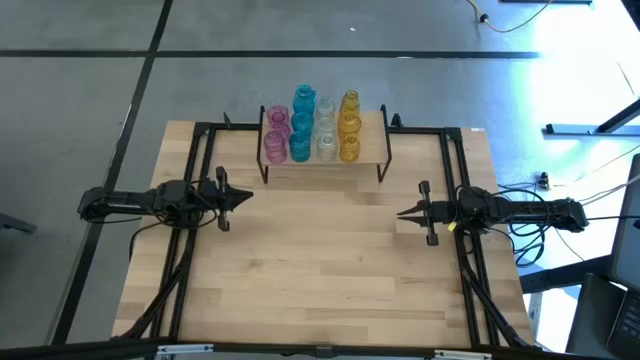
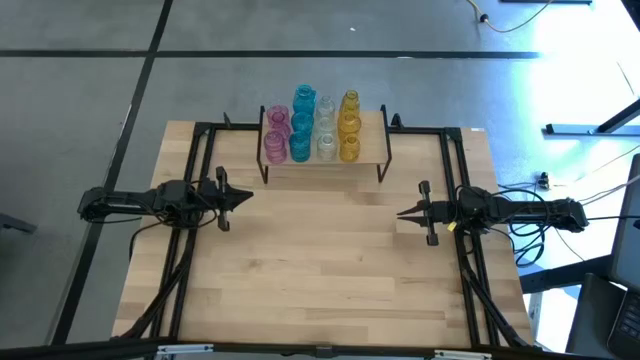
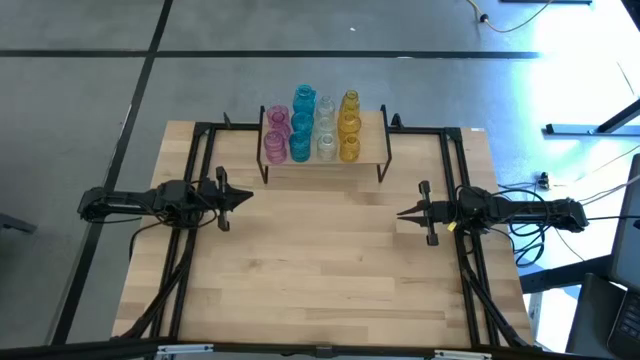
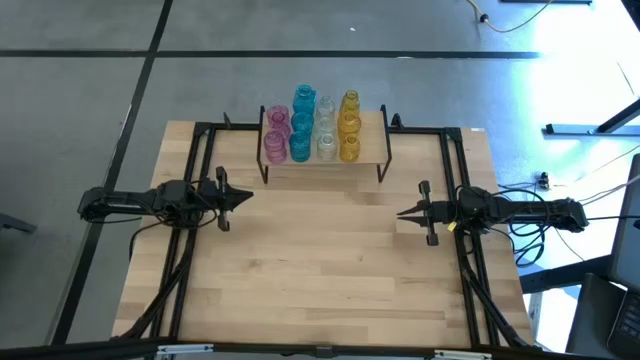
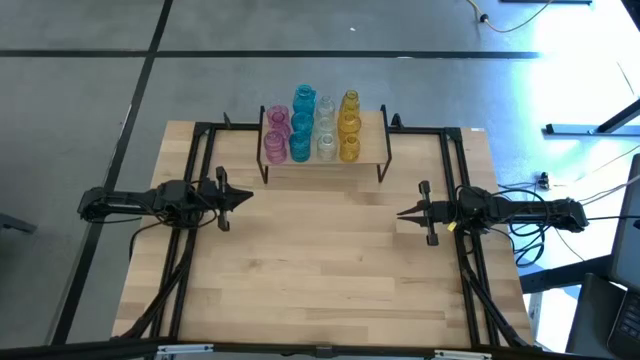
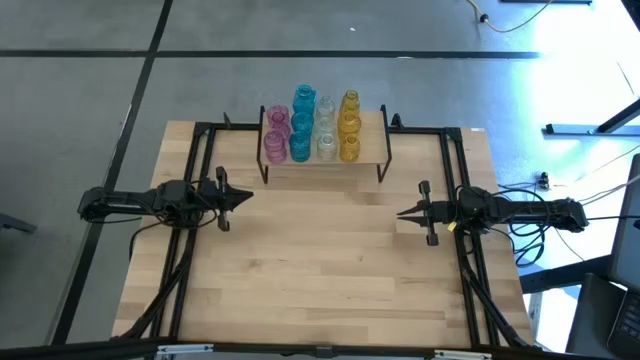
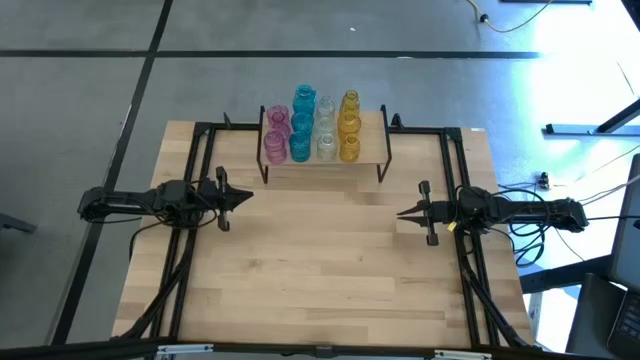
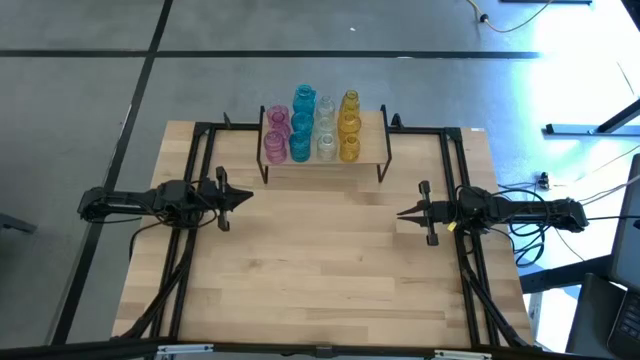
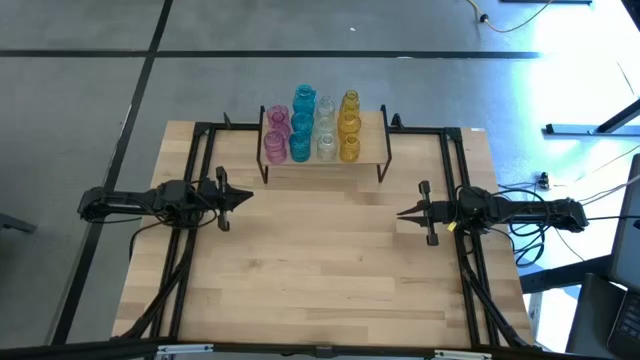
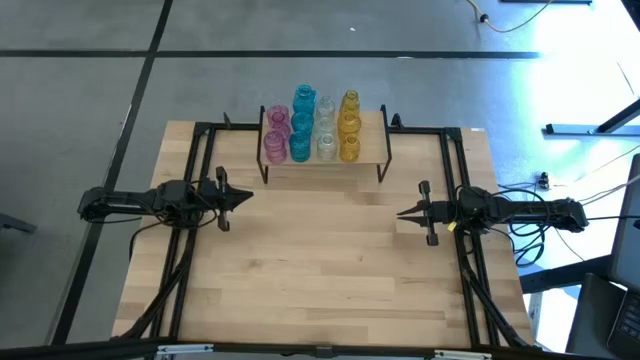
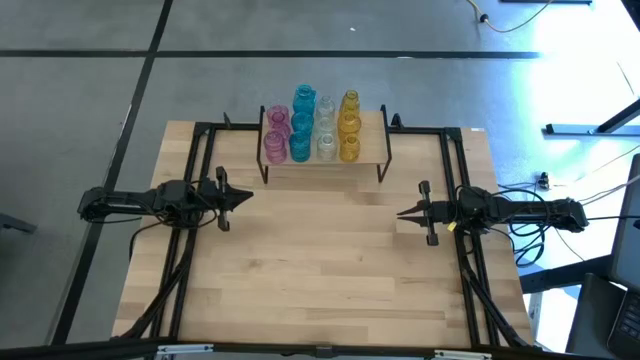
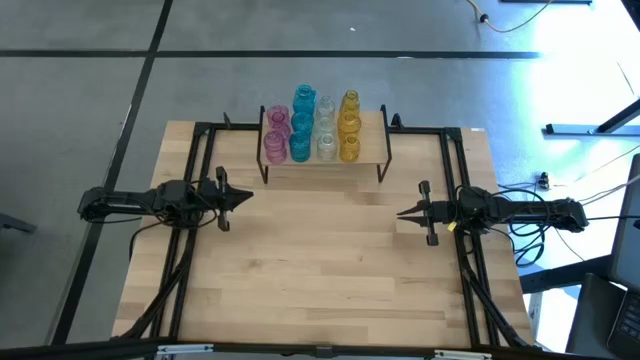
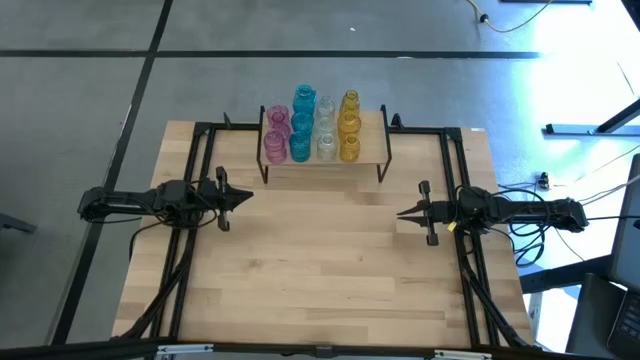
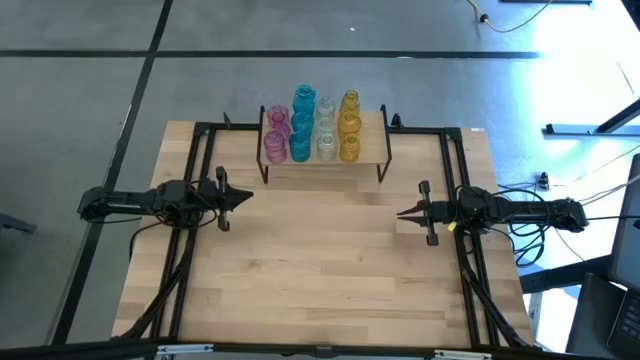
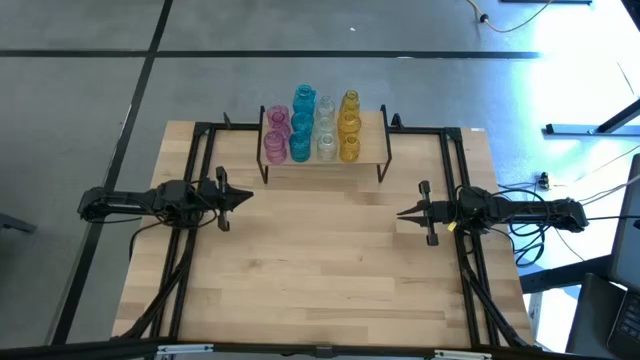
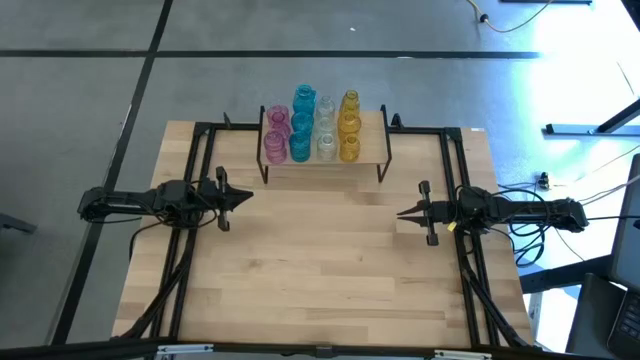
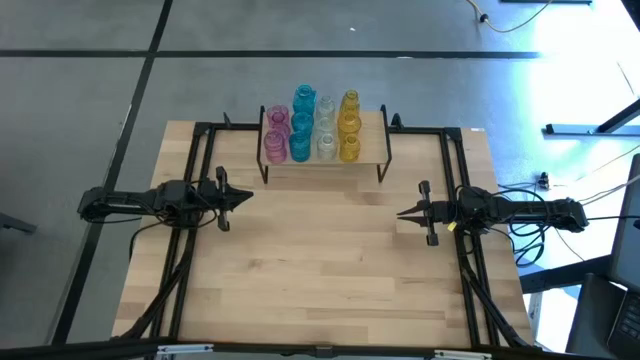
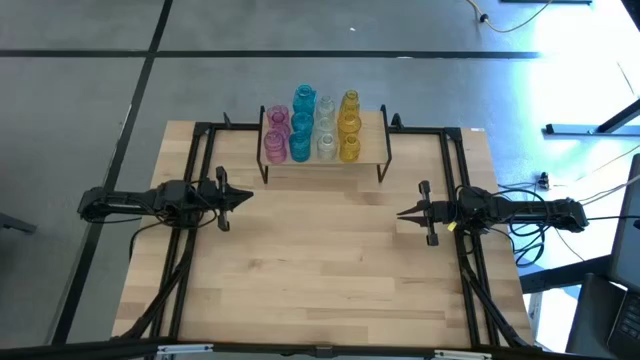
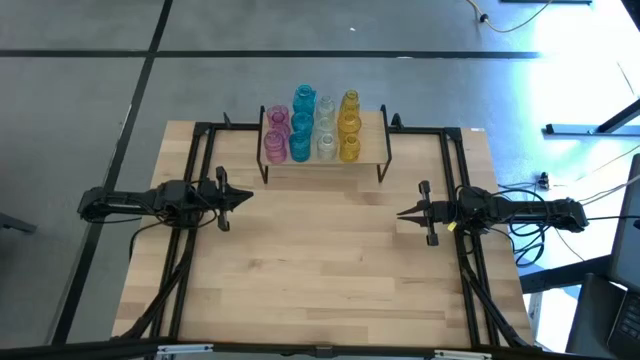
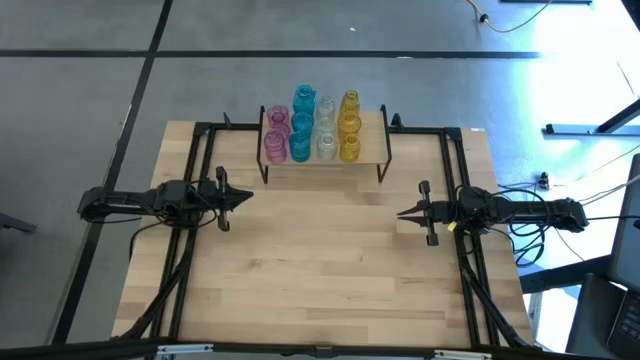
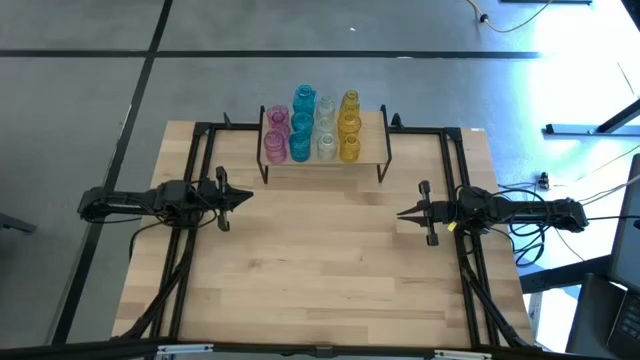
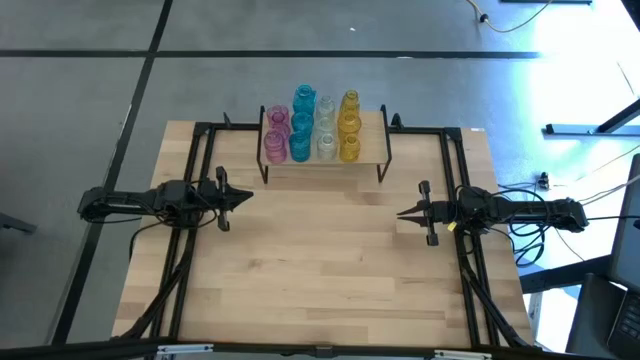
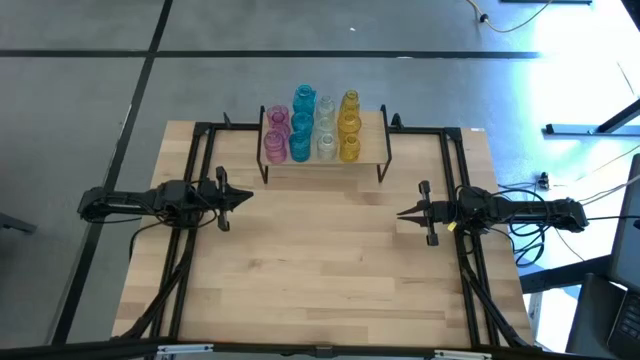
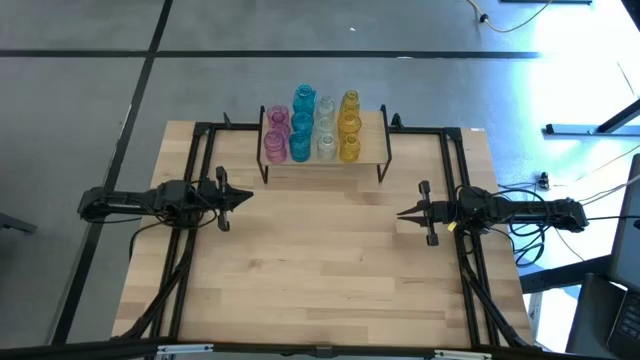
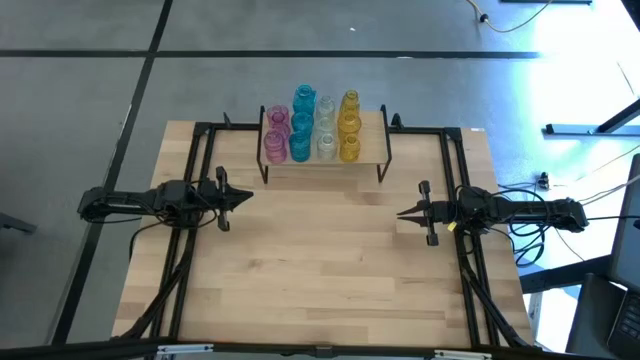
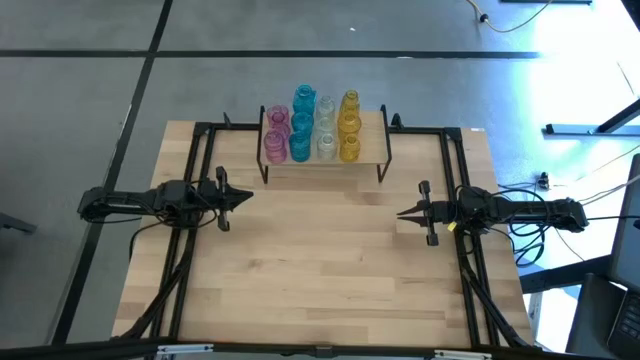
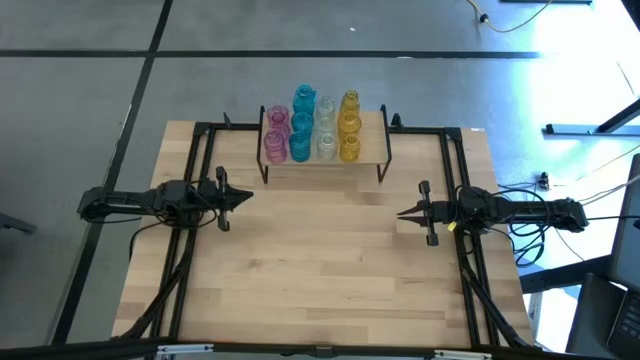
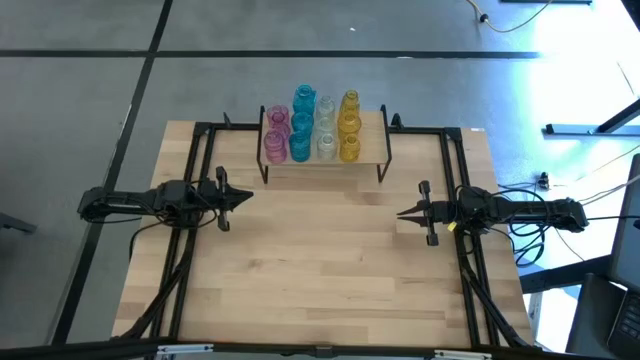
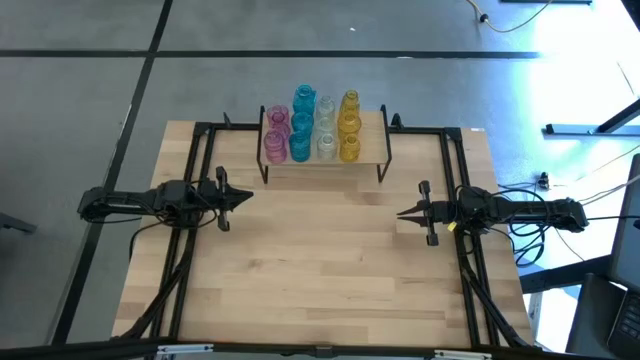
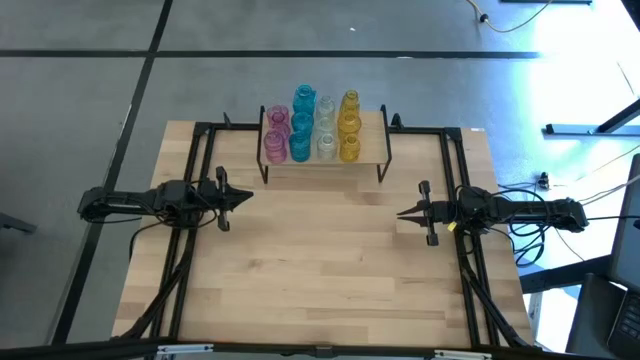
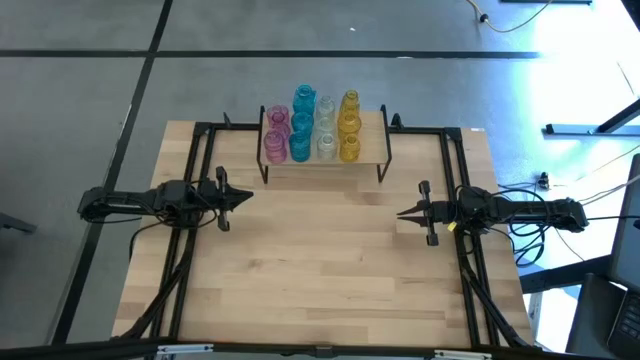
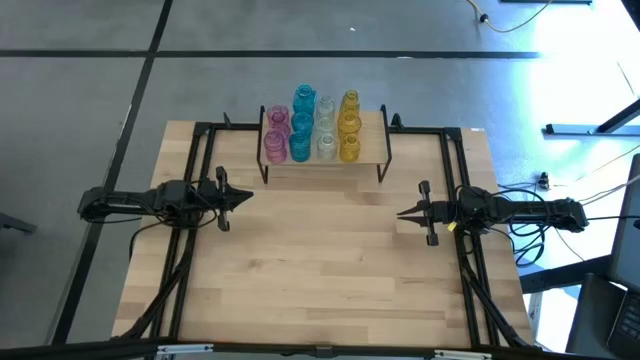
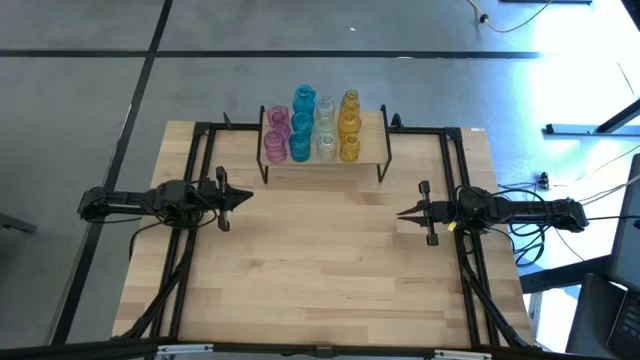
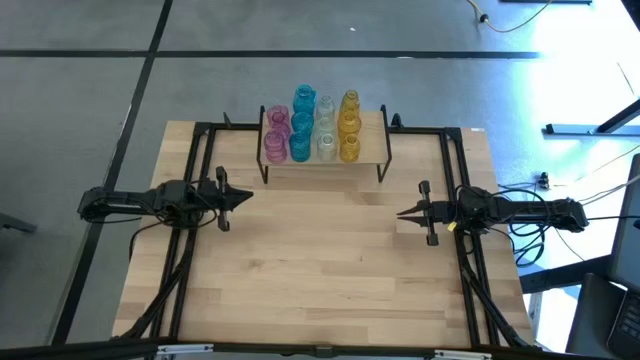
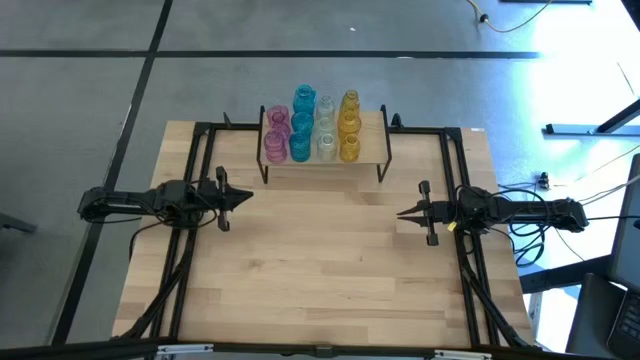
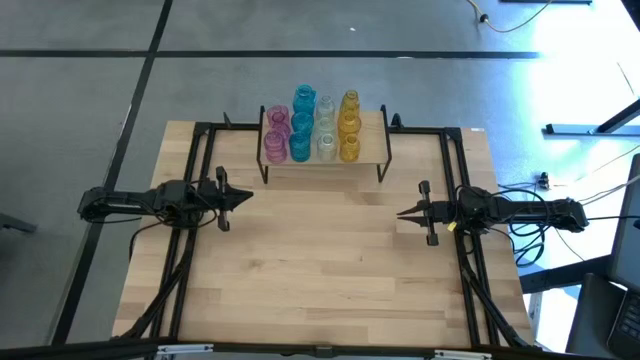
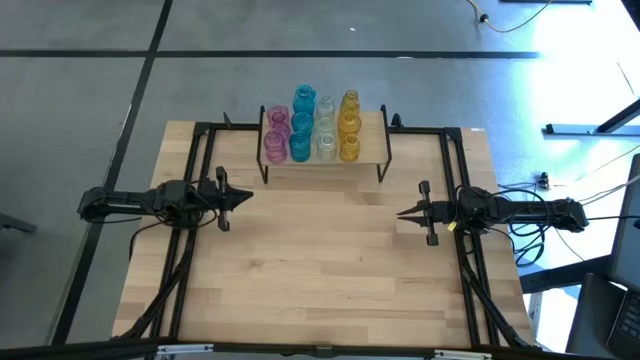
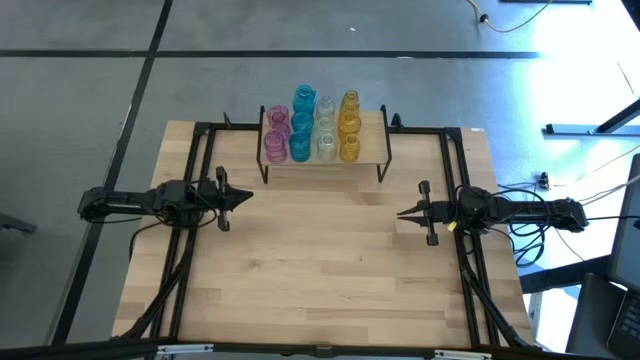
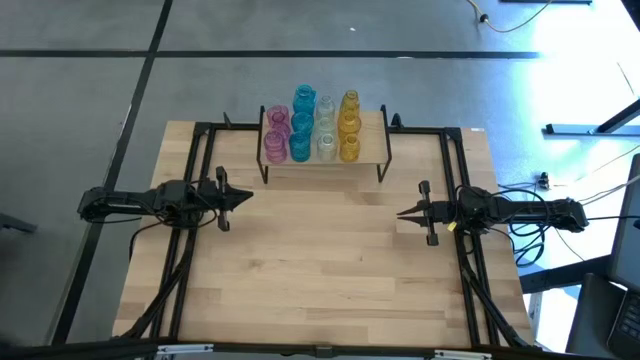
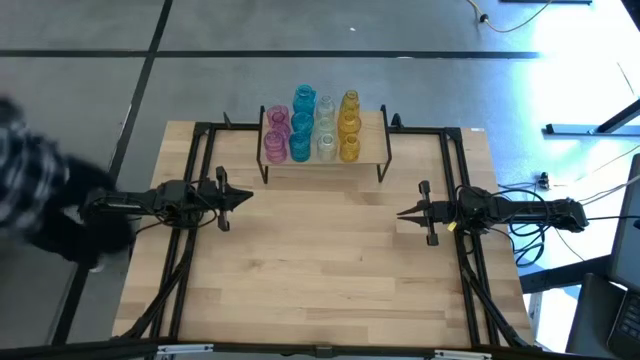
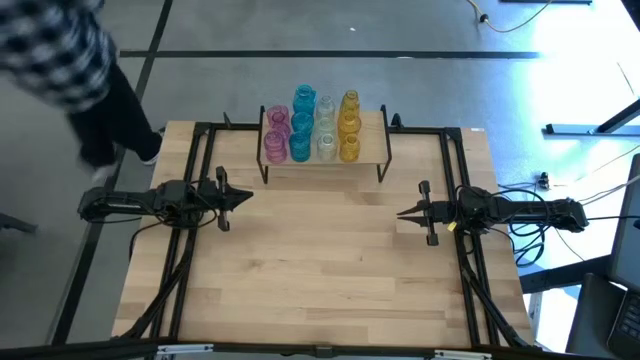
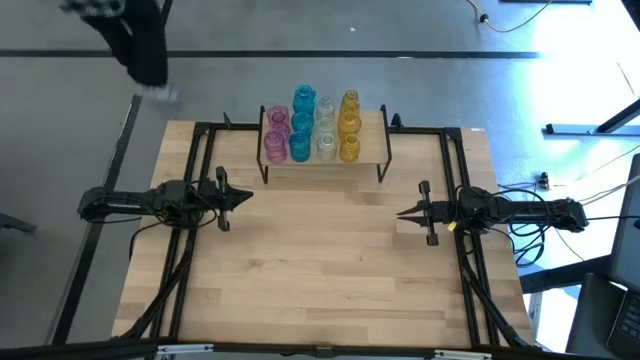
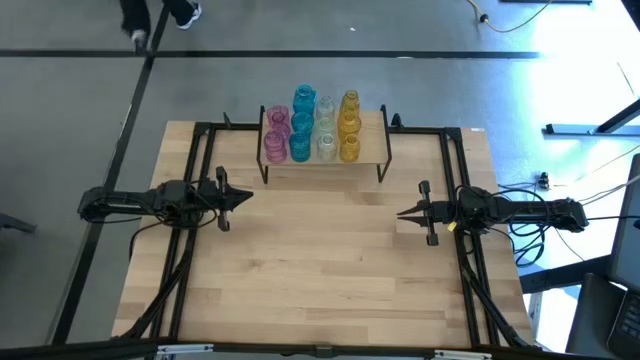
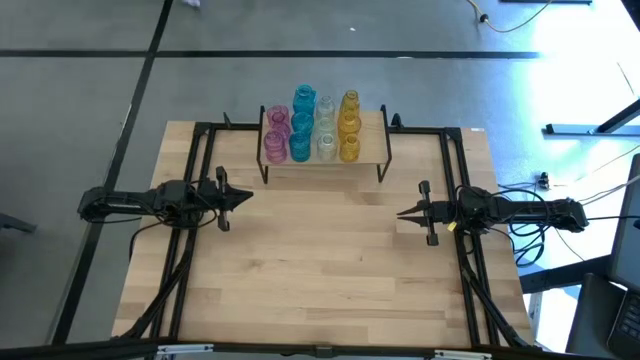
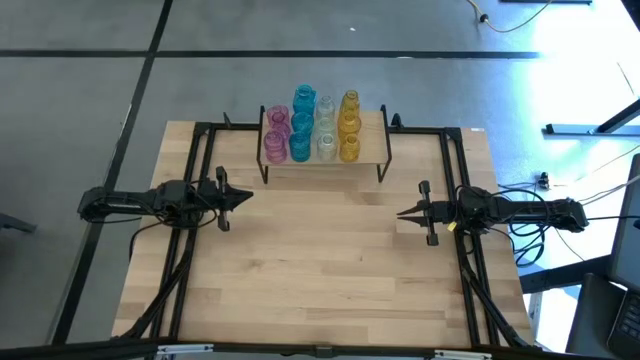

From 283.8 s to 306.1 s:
Task: sort vases onto shelf
Return to Home Position
